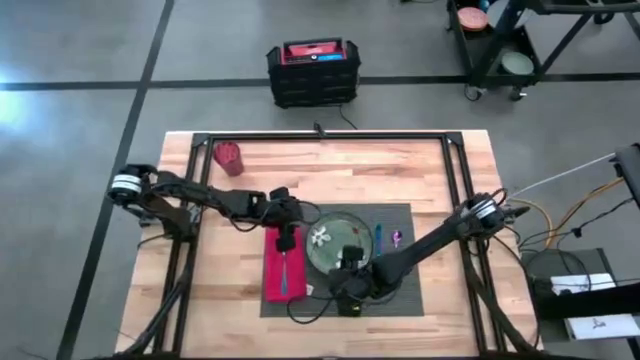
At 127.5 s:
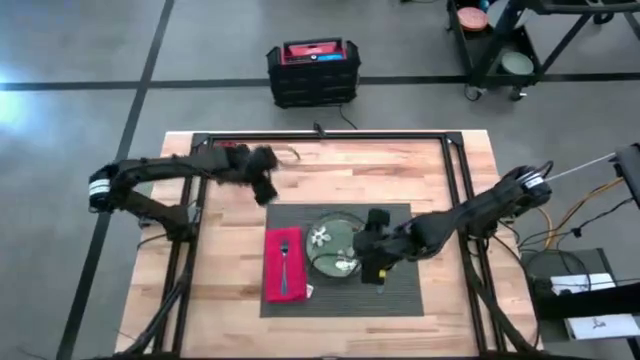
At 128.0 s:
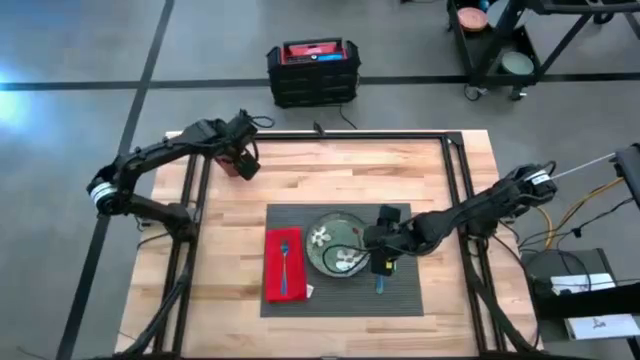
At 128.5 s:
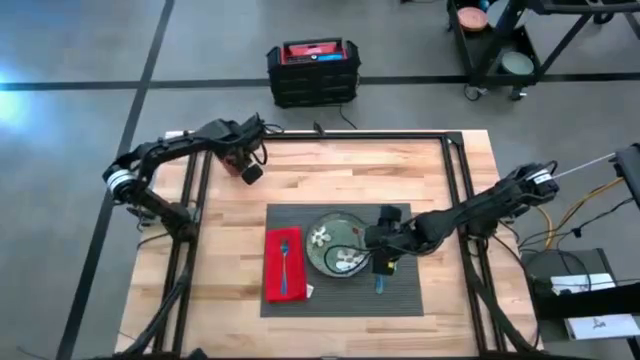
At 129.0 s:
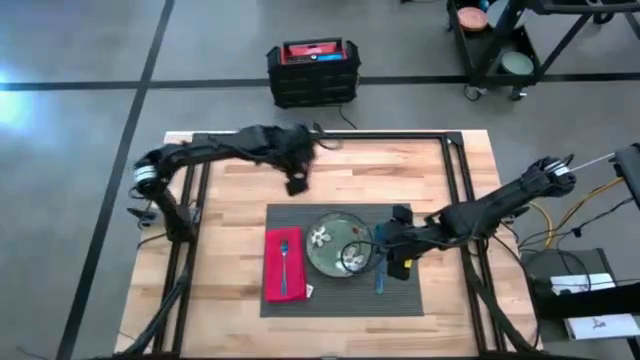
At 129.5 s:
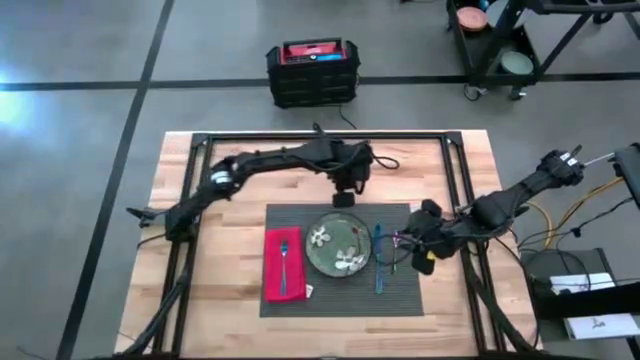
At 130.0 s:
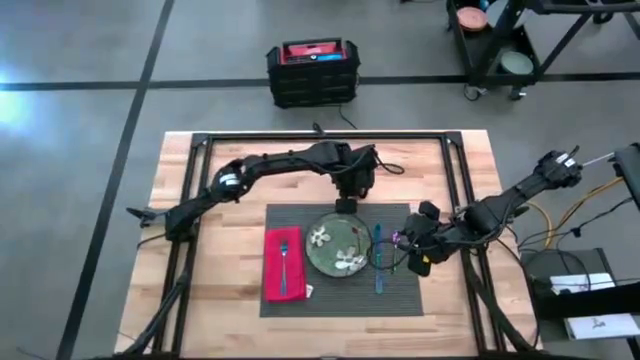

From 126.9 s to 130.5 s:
Task: Set table place
Put the red cup above the gray table mat

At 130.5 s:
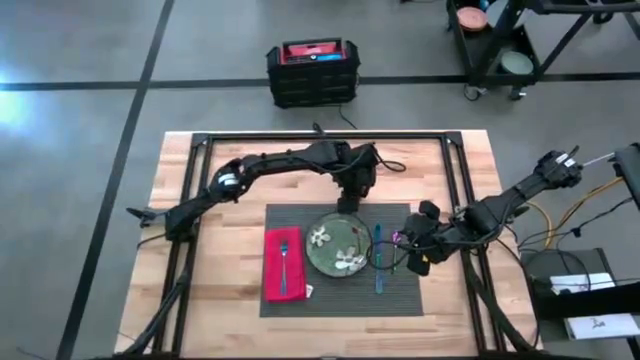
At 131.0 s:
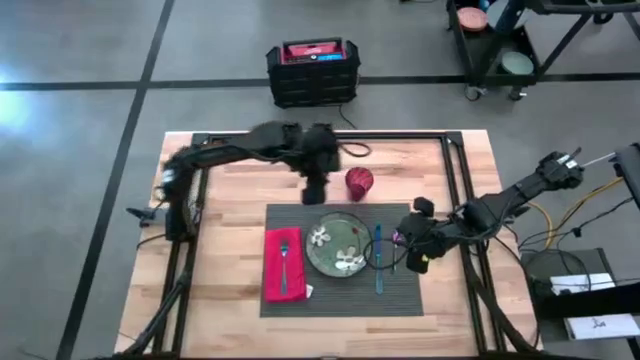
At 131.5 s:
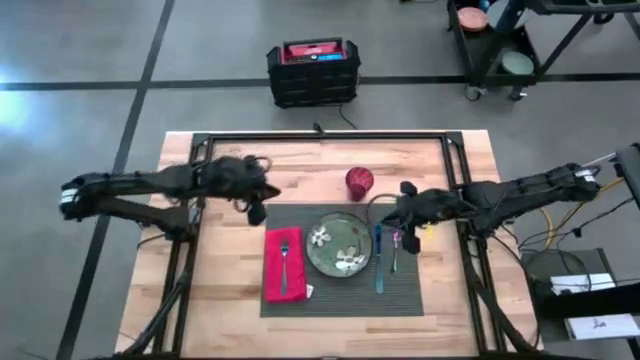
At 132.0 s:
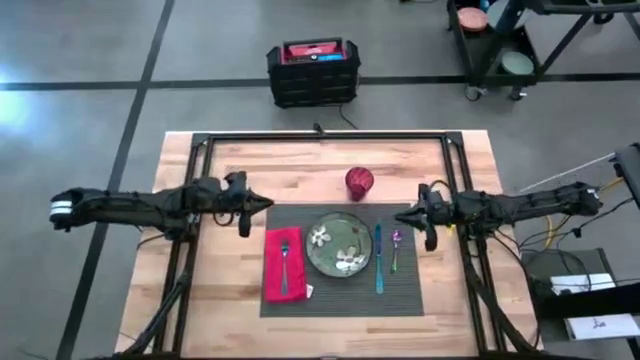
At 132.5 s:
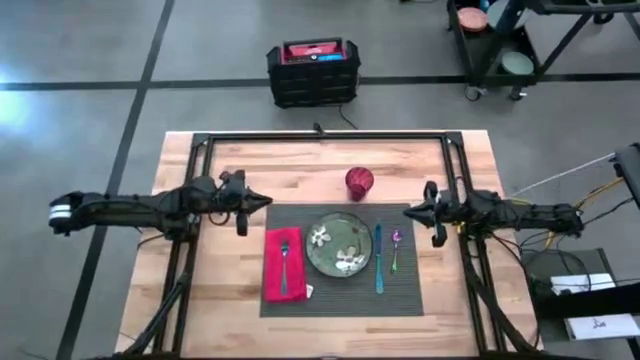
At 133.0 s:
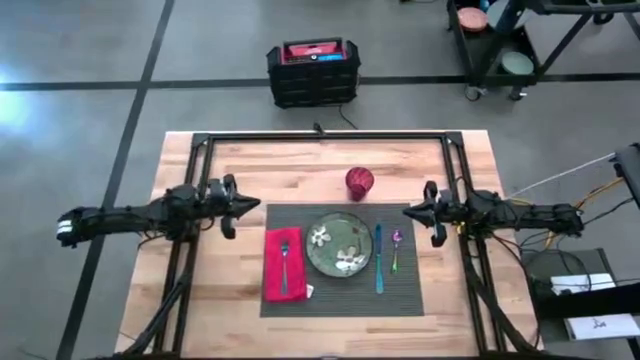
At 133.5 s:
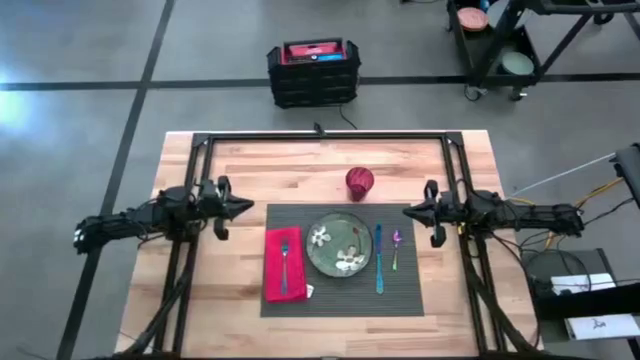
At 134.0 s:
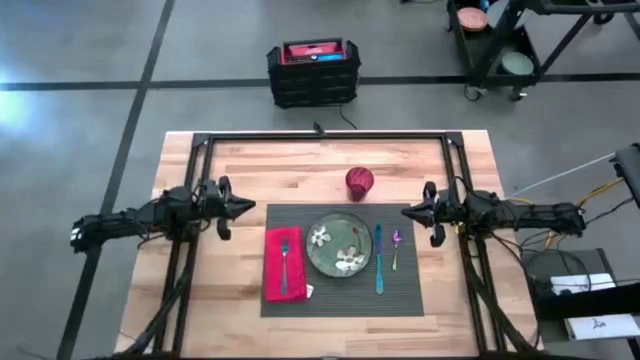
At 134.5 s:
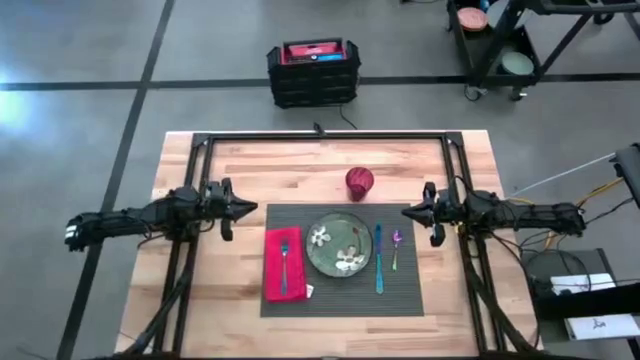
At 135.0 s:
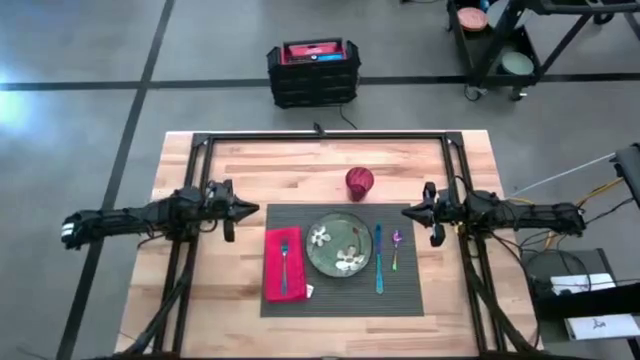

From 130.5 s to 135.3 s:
Return to Home Position

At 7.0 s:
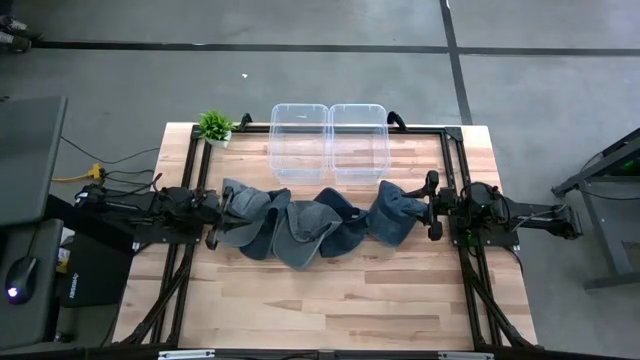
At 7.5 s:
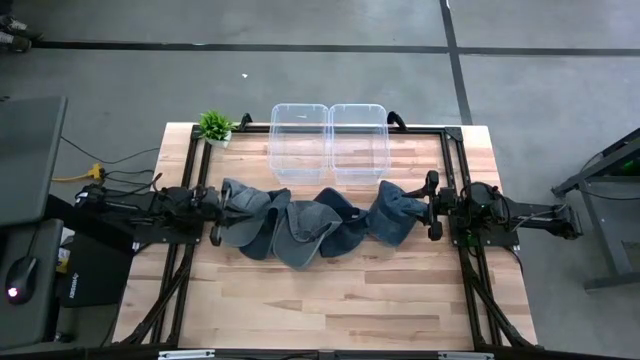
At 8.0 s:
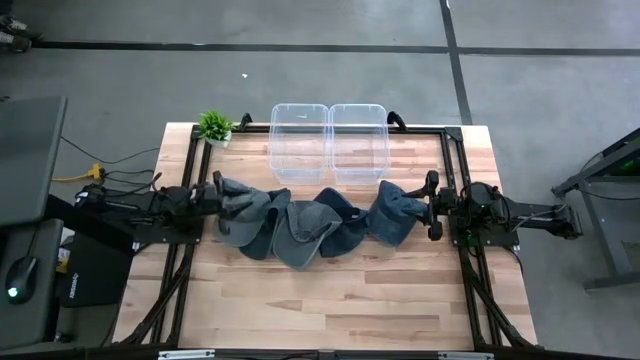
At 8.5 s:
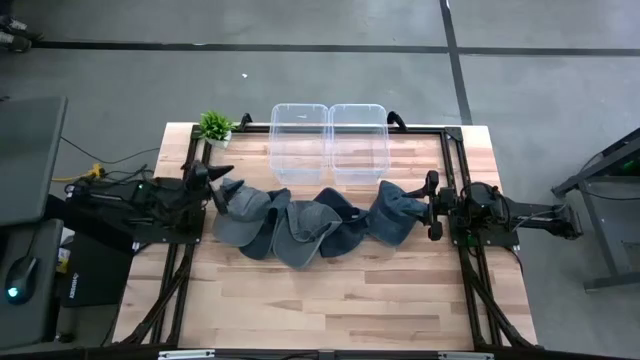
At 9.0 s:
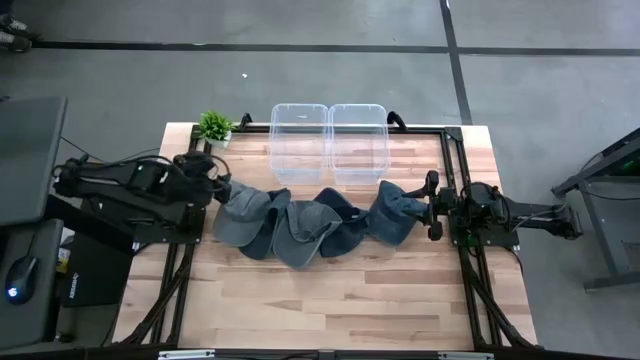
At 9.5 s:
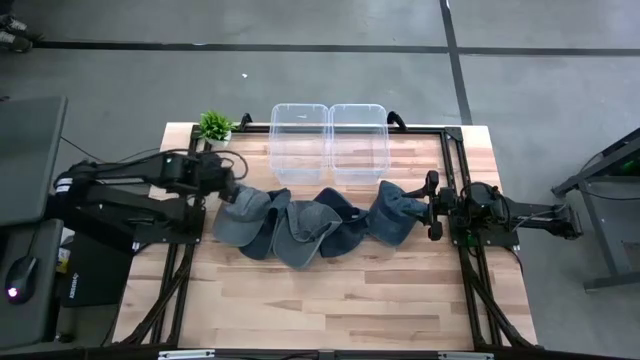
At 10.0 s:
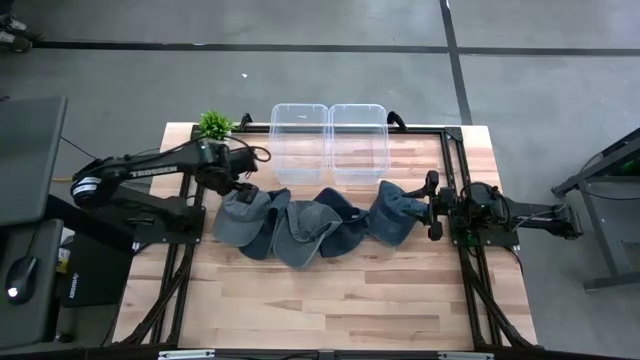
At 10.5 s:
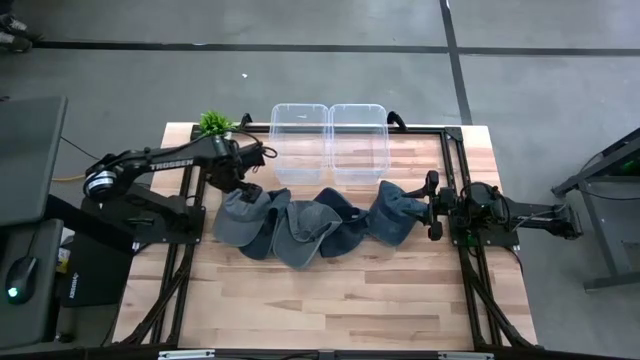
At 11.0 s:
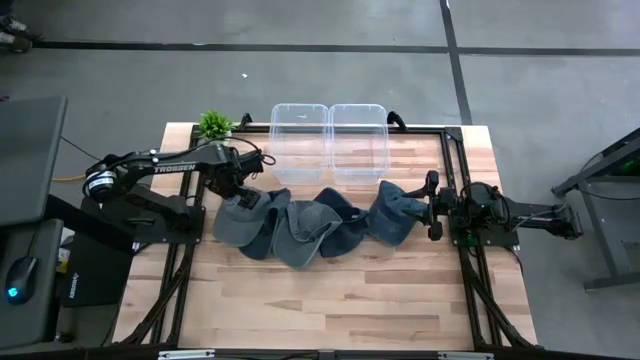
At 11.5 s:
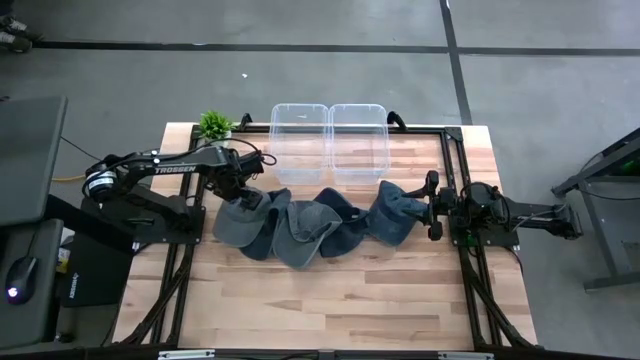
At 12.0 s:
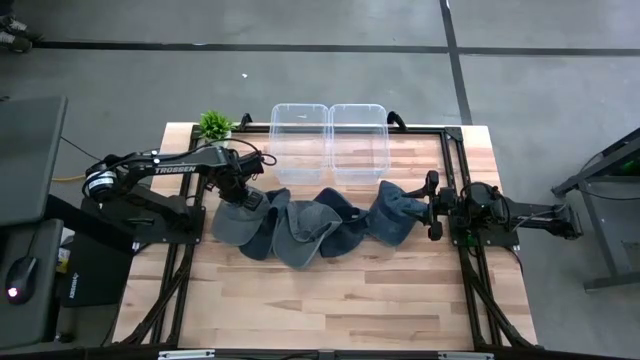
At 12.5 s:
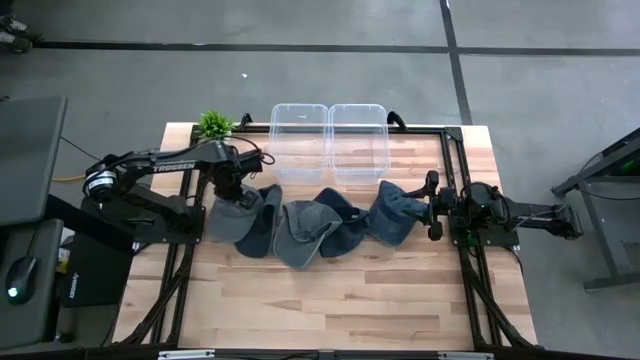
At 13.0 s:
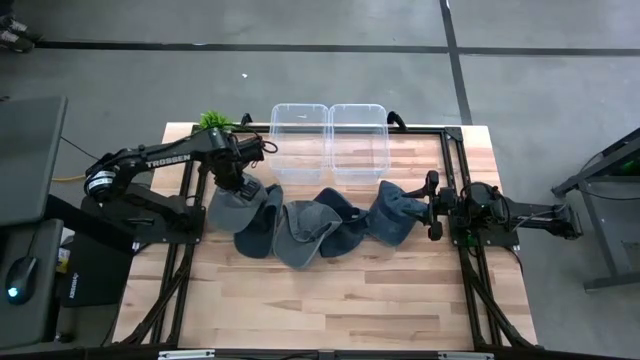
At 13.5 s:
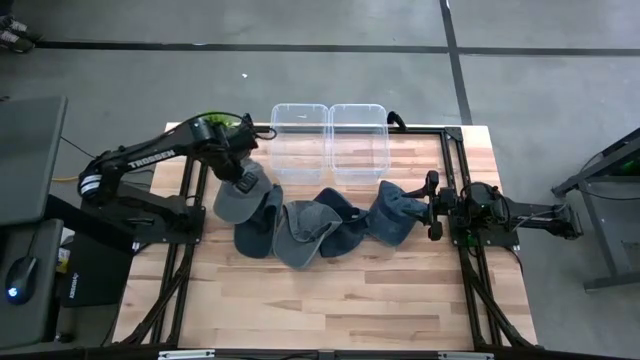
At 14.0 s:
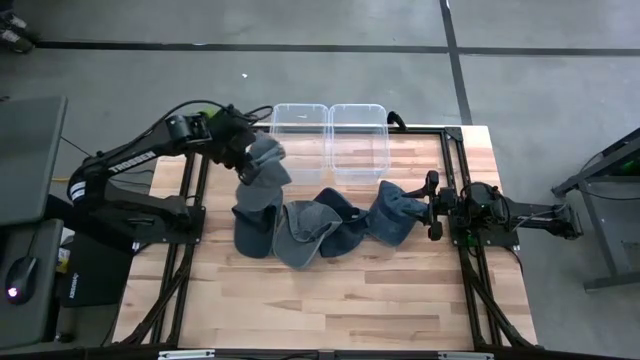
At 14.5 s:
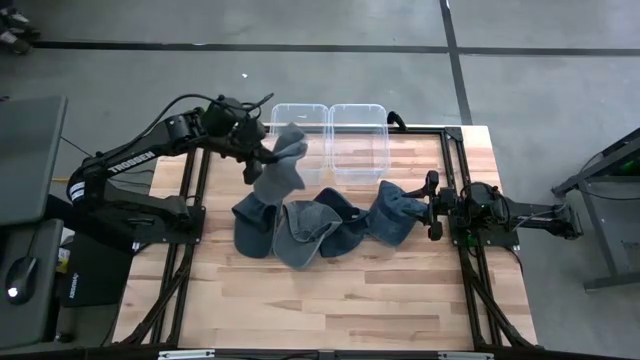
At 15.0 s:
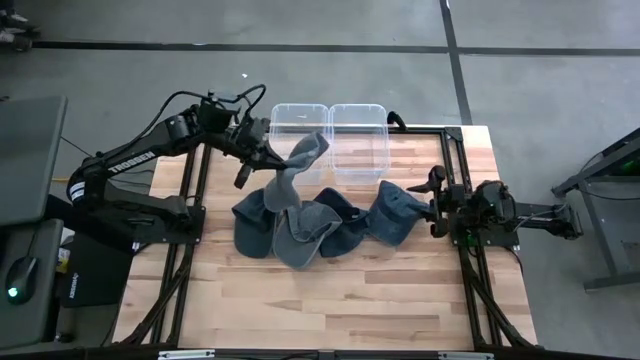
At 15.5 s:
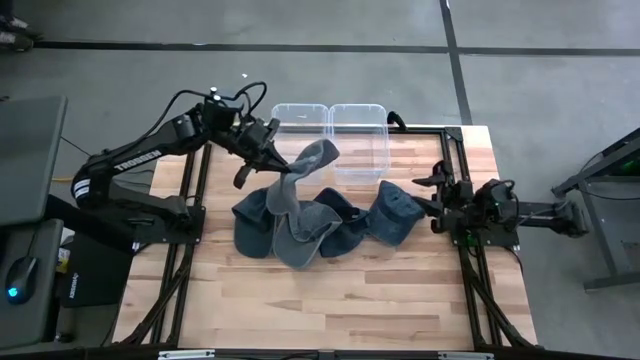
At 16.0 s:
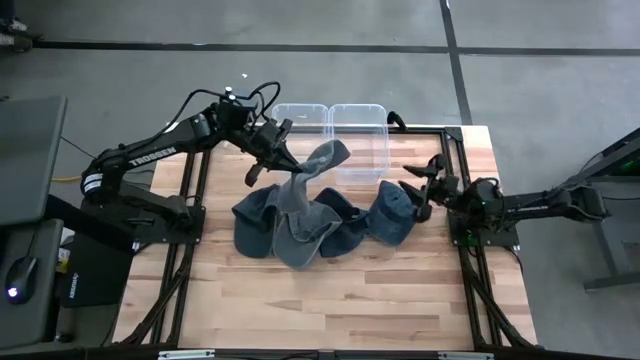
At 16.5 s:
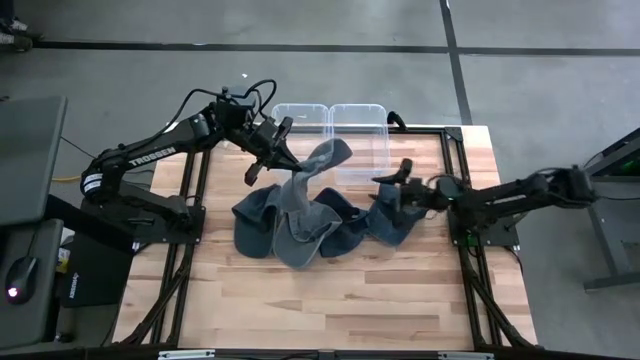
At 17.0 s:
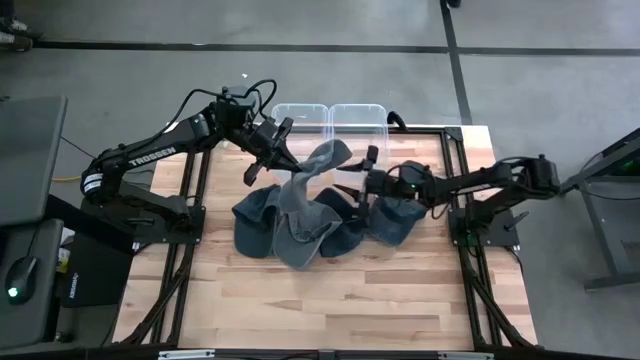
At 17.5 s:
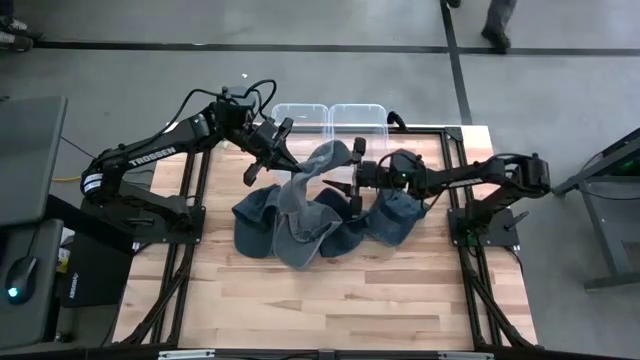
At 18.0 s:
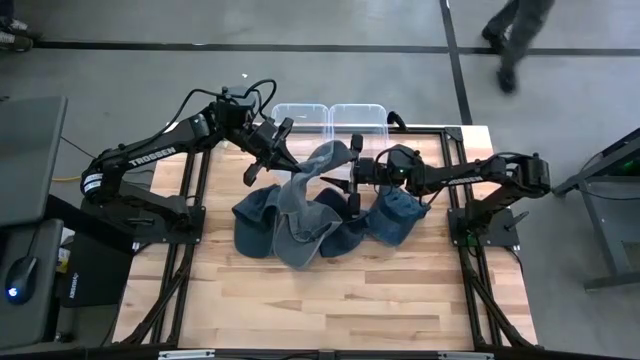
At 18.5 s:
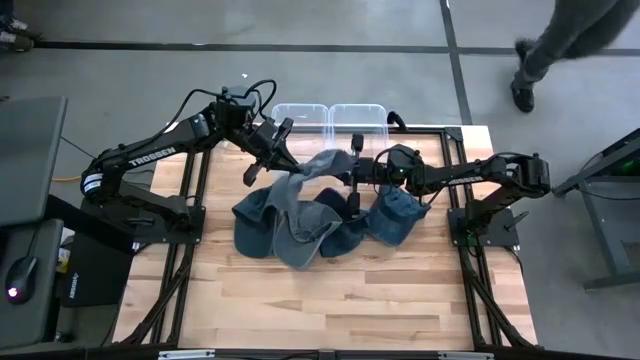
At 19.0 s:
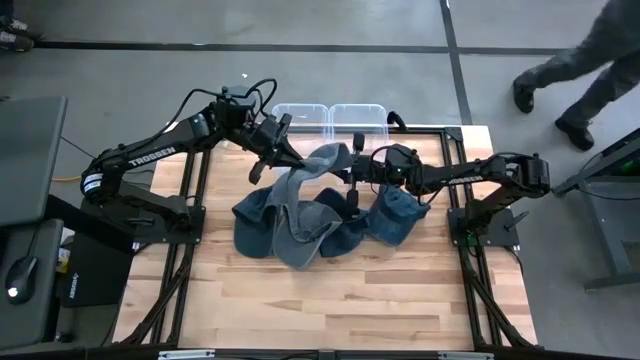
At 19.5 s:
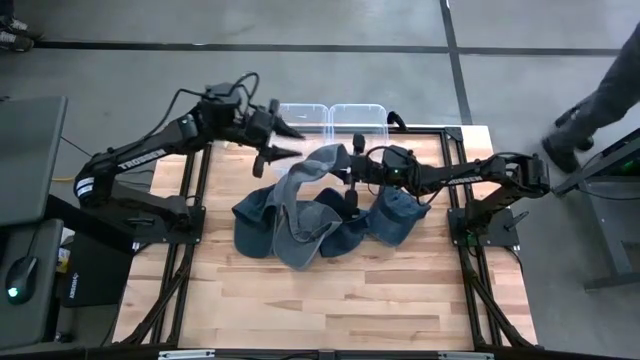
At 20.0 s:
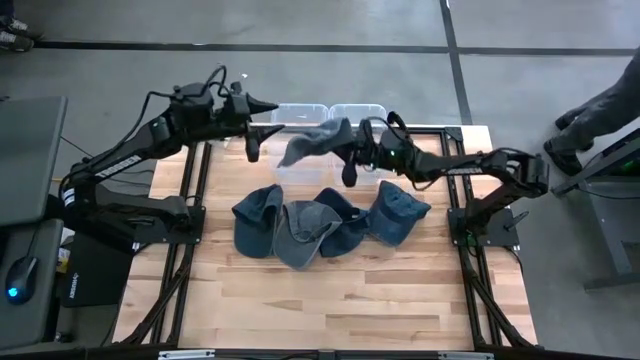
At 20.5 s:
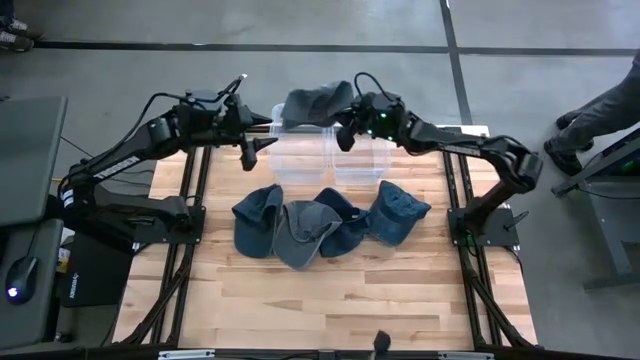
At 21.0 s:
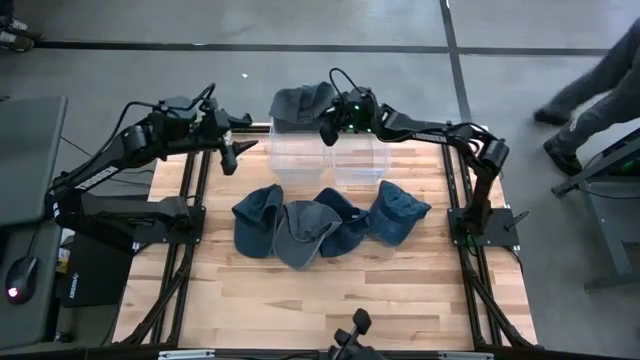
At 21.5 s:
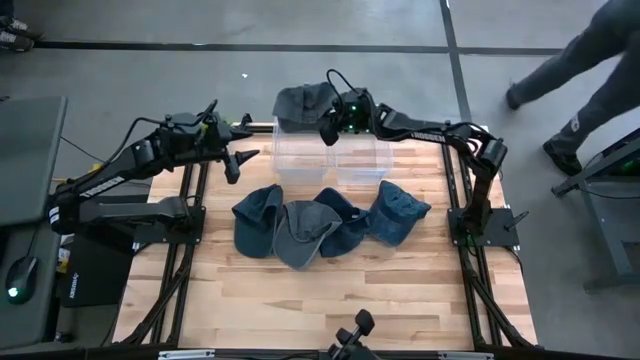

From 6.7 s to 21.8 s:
Task: Pick & Place hat
Put the left gray cap into the left transparent bin
